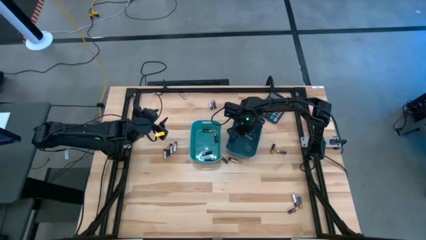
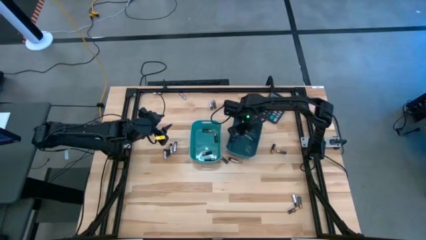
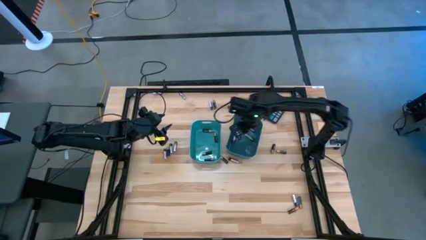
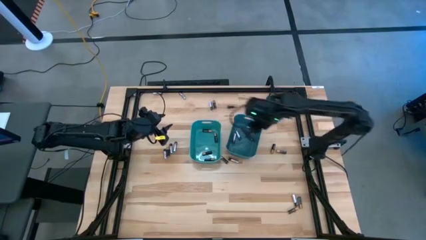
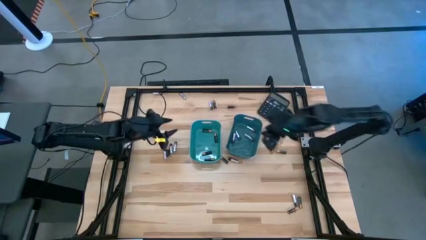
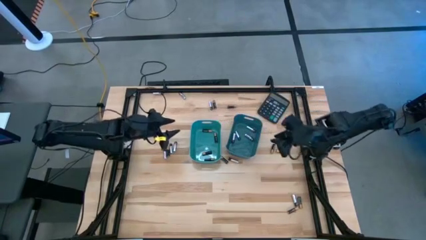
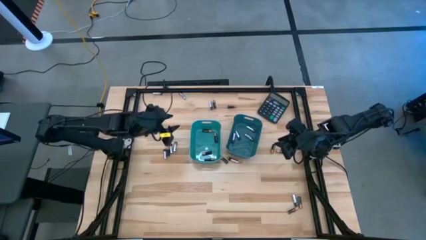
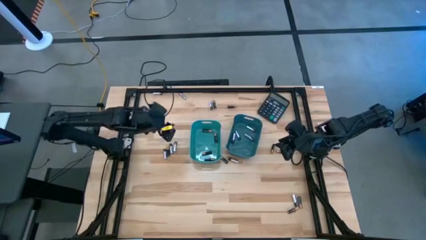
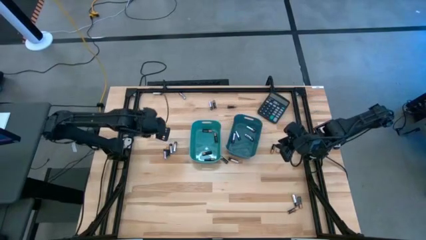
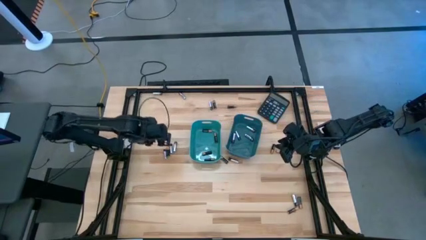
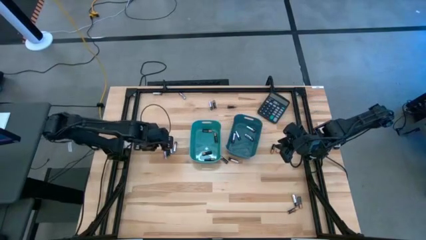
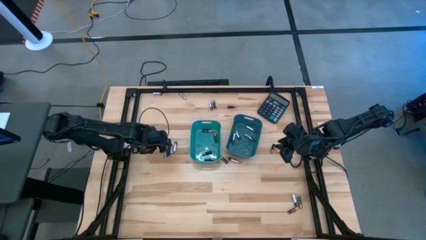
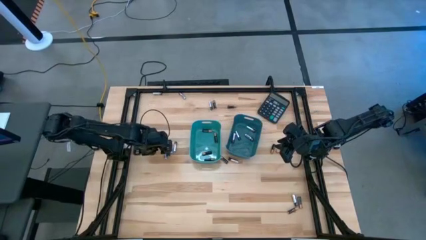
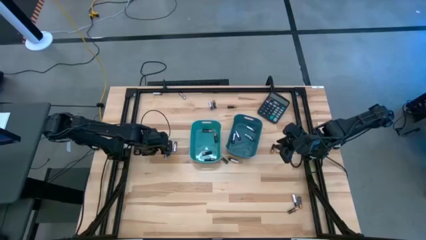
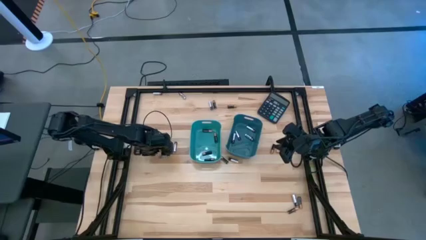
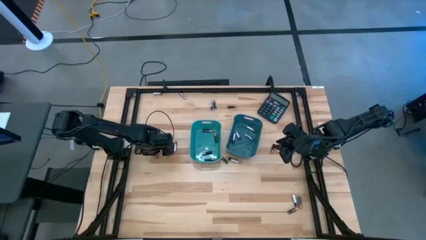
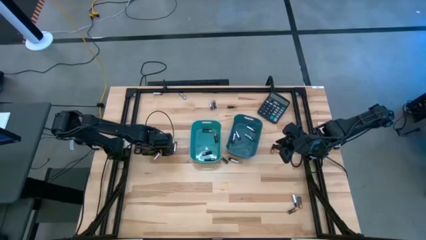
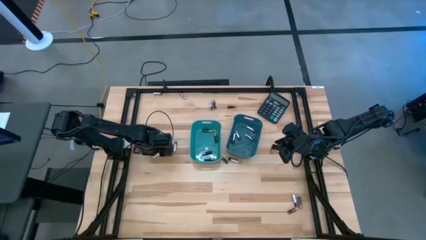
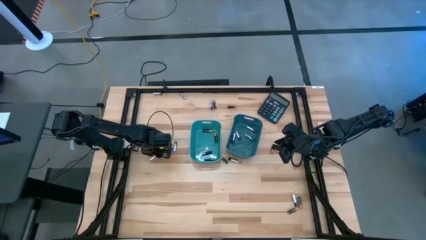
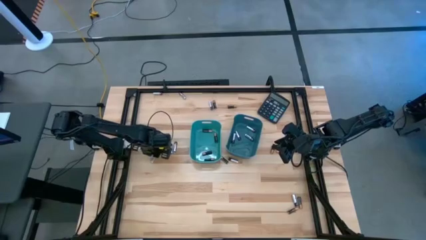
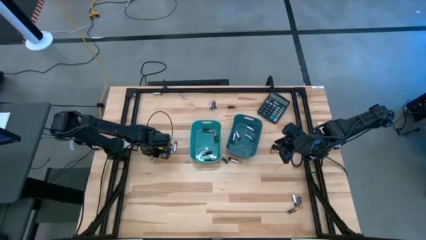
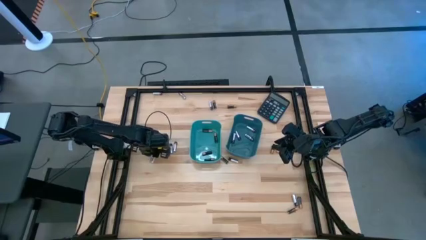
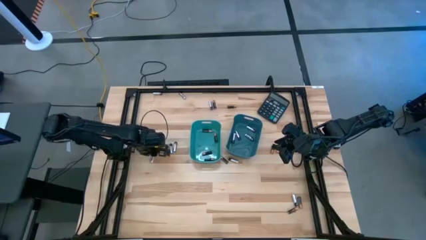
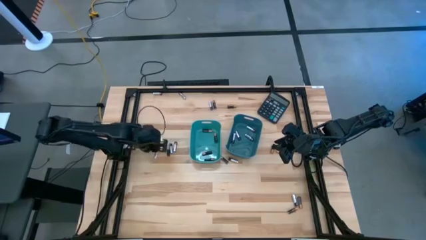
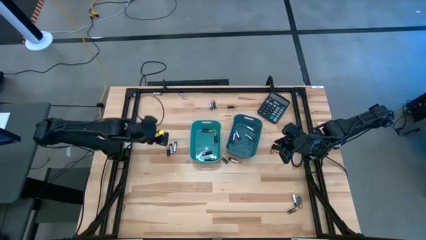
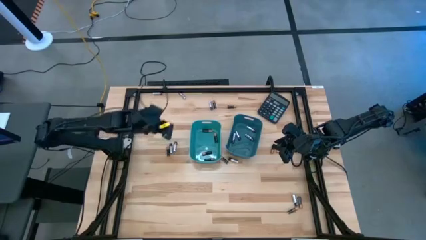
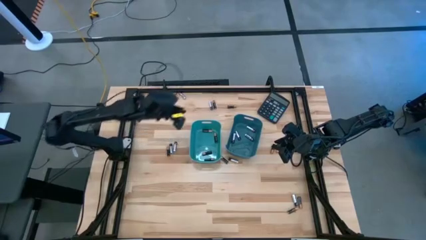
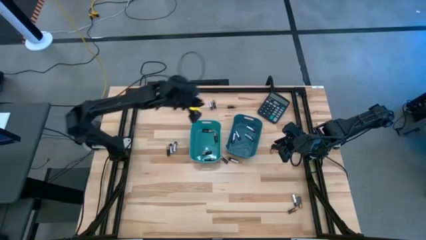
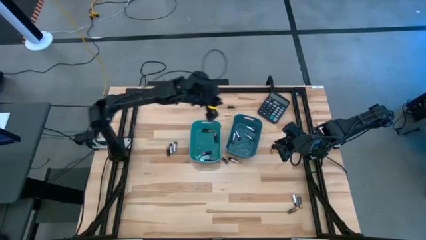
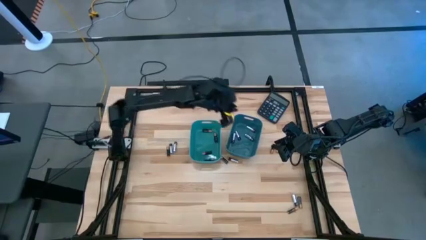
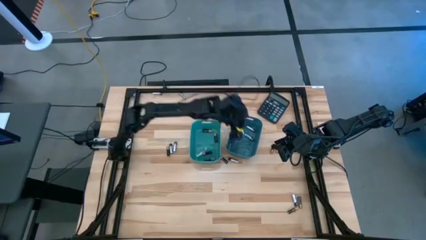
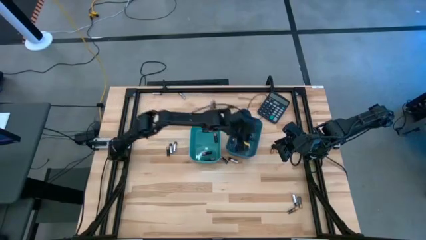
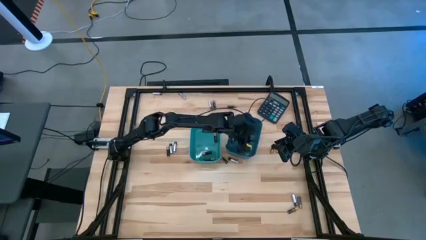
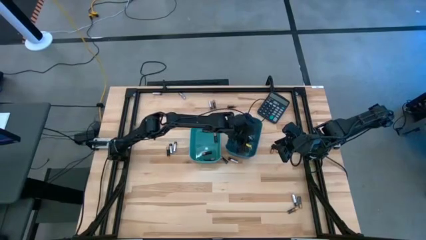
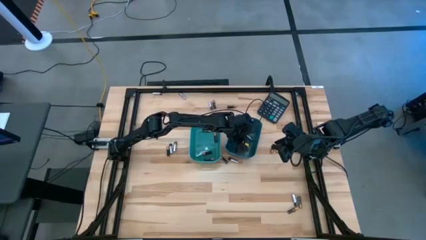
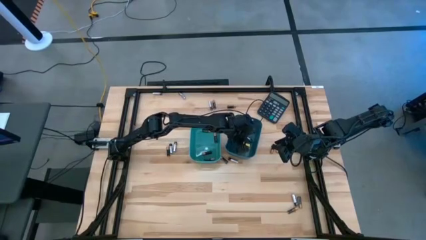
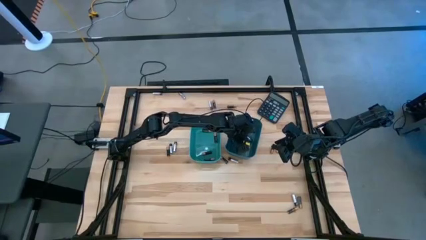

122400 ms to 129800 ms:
Task: Sort batteries
Put the silver battery into the blue bin

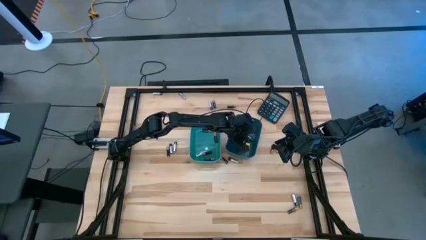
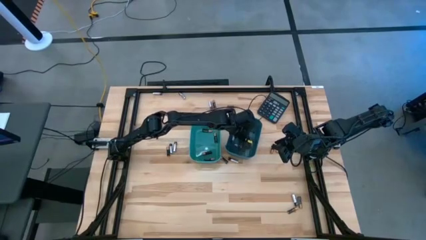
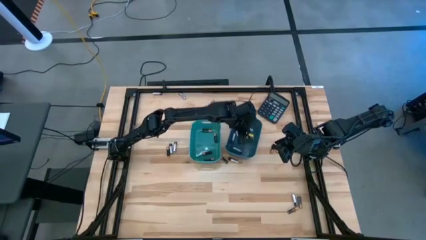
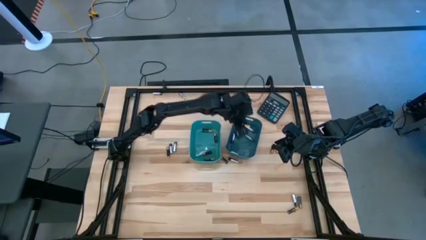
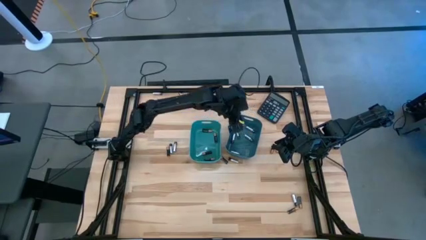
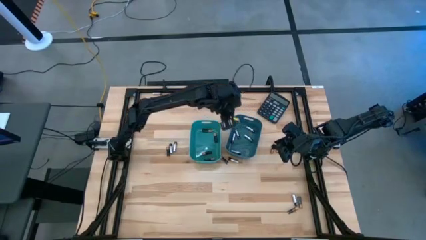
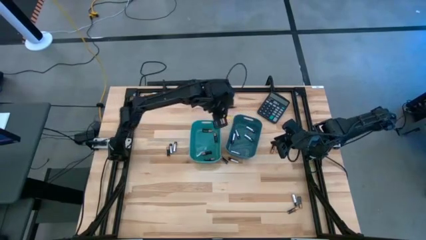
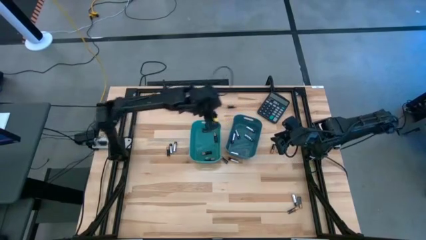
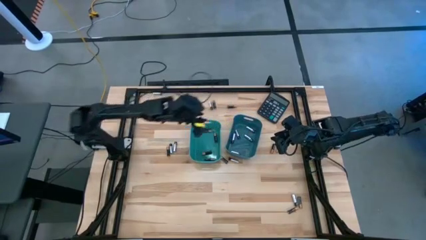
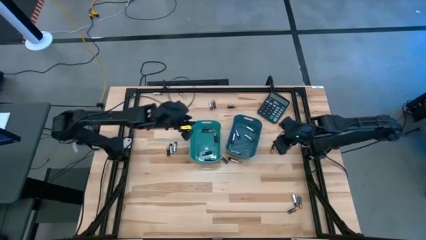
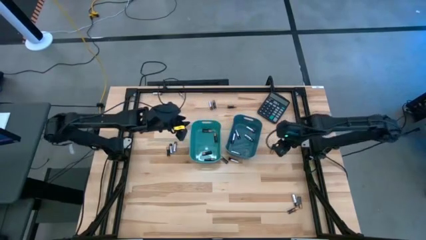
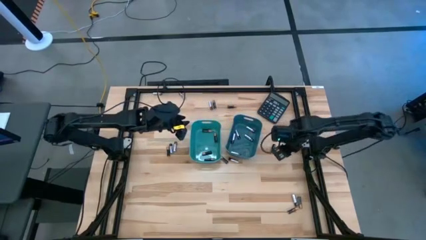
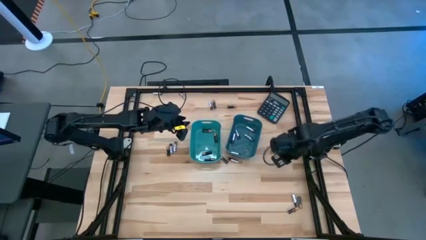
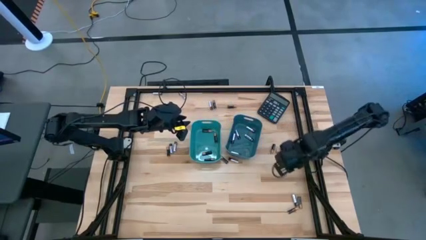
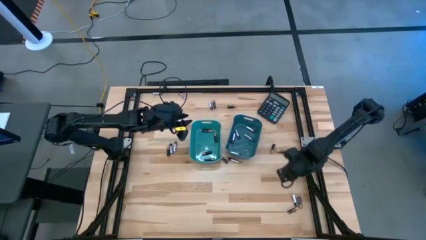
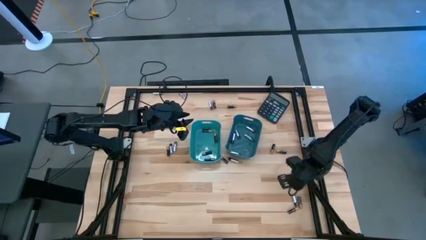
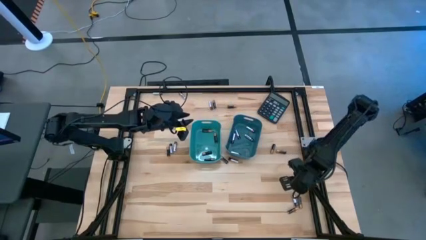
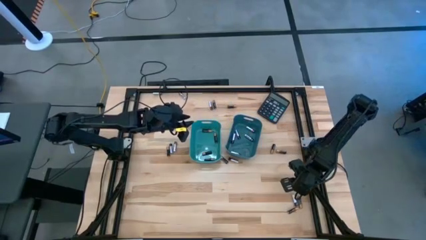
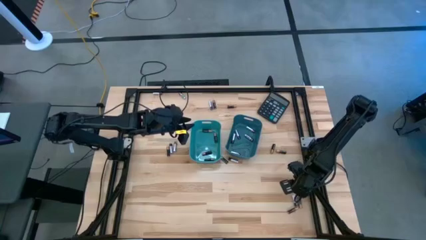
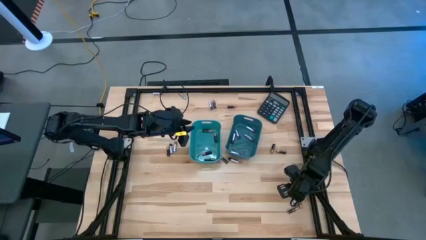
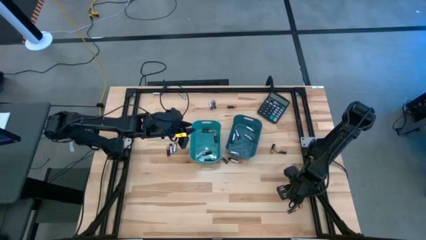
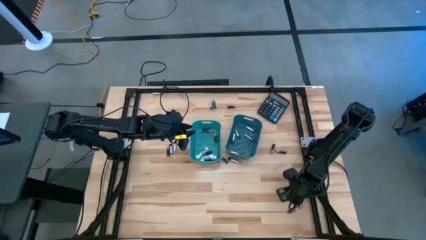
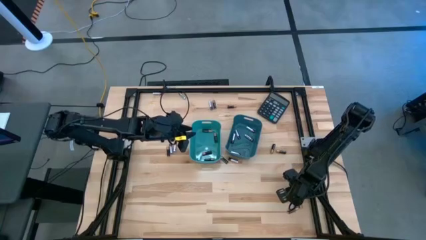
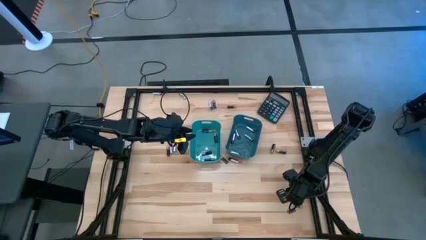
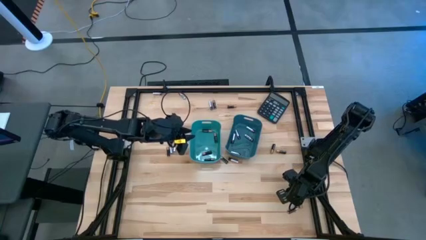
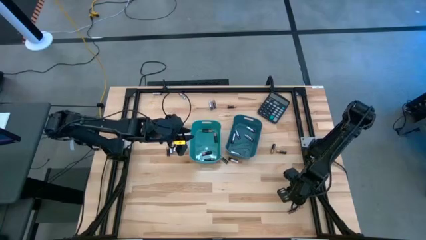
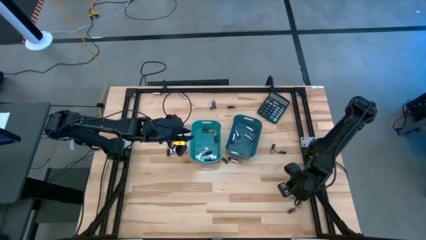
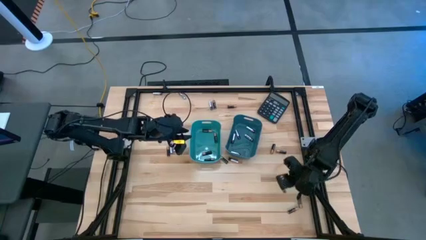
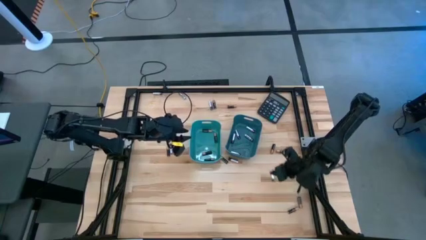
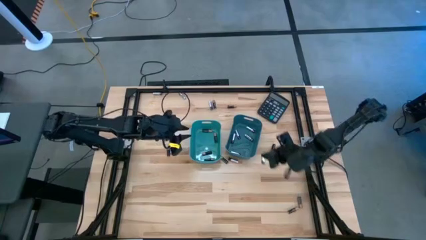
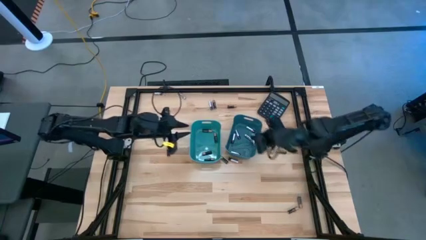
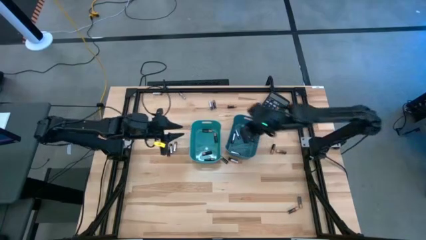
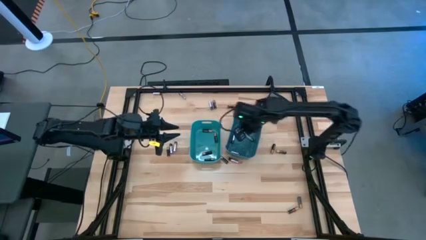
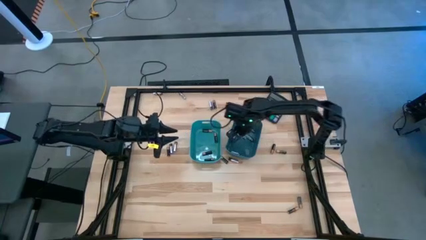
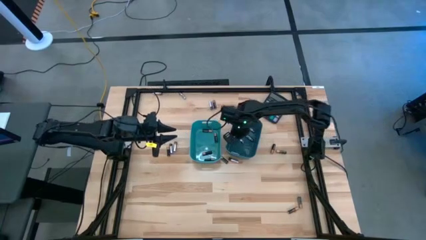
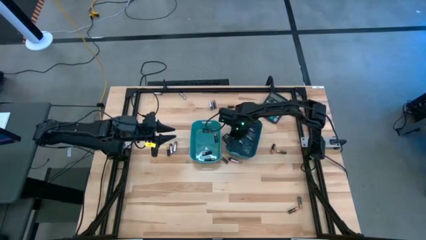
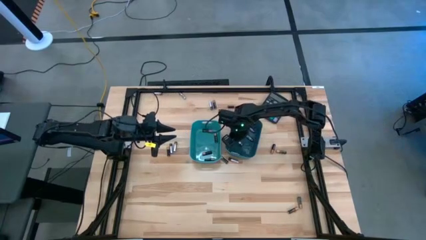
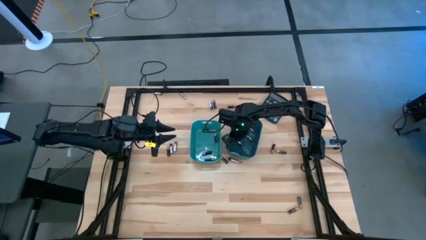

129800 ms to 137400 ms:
Put the silver battery into the blue bin
